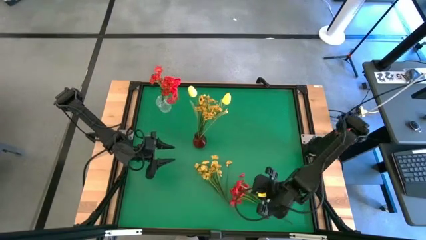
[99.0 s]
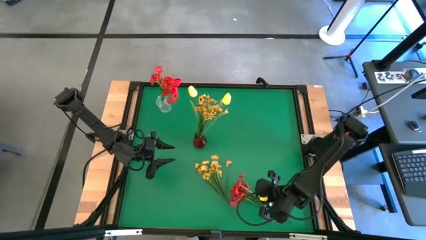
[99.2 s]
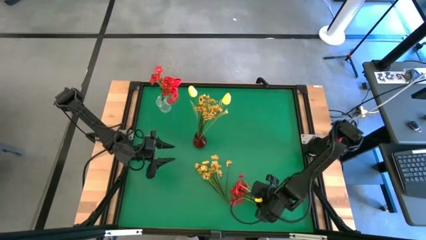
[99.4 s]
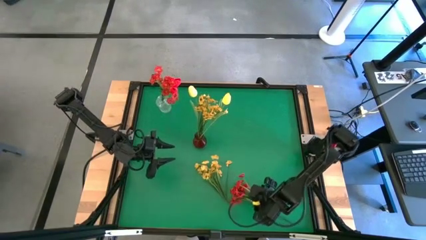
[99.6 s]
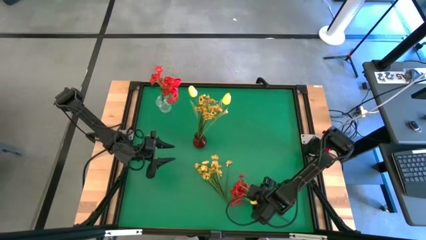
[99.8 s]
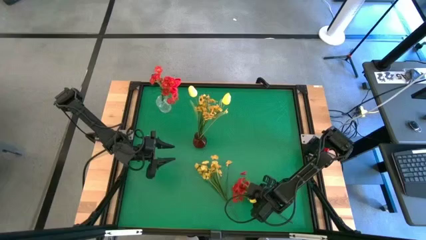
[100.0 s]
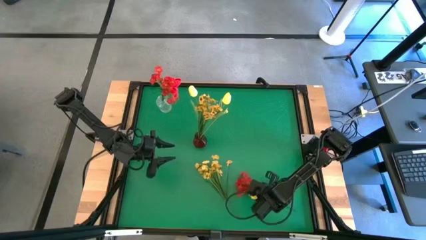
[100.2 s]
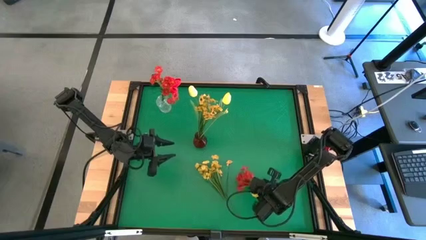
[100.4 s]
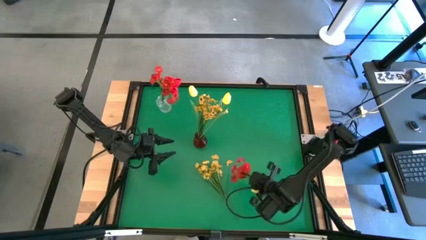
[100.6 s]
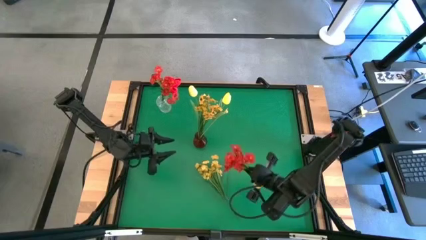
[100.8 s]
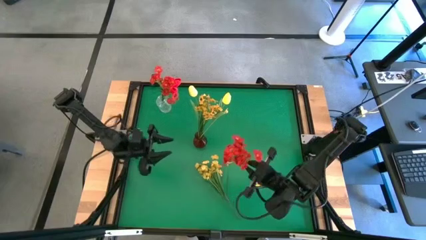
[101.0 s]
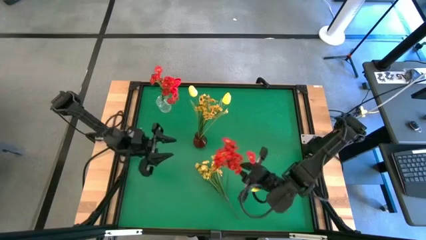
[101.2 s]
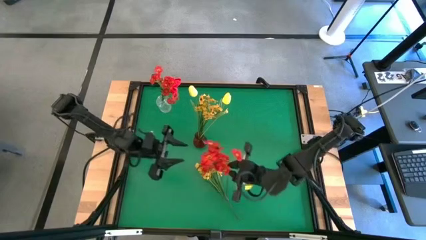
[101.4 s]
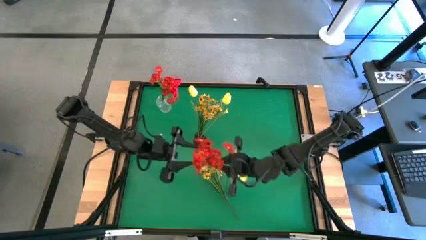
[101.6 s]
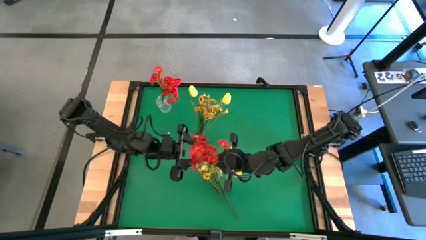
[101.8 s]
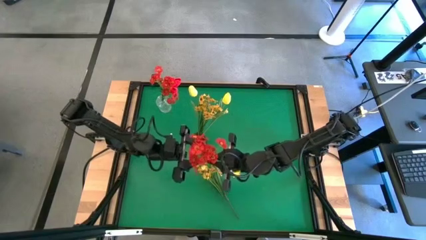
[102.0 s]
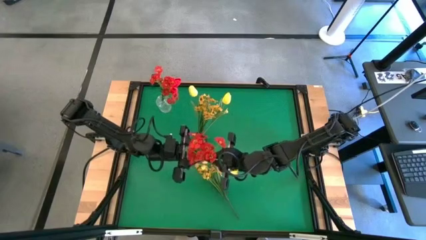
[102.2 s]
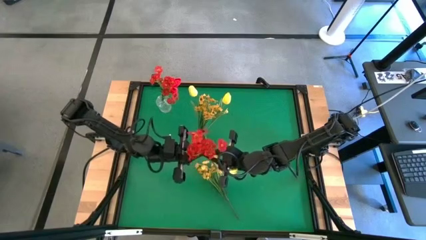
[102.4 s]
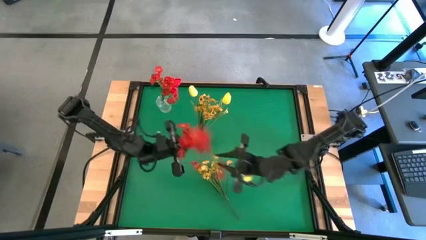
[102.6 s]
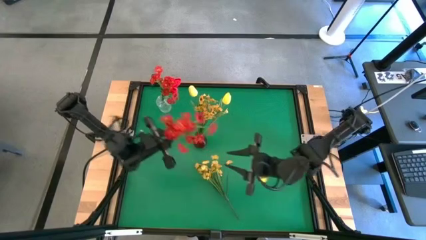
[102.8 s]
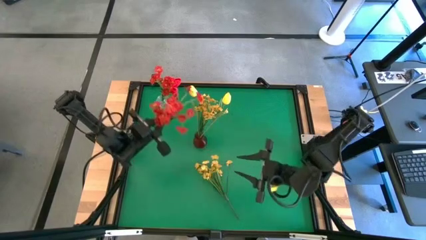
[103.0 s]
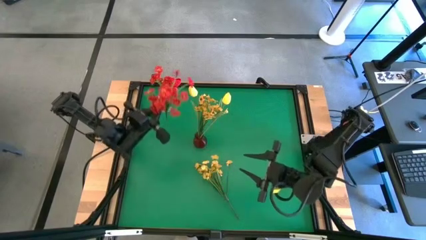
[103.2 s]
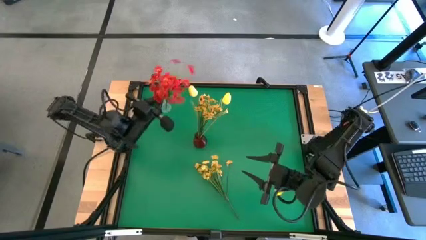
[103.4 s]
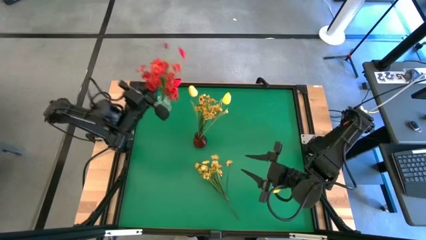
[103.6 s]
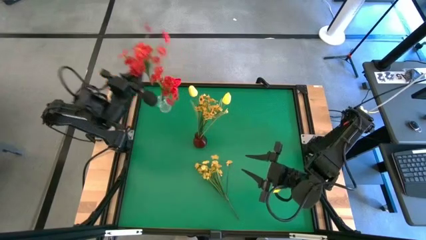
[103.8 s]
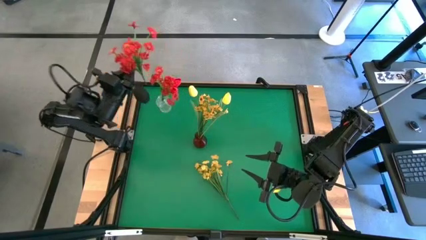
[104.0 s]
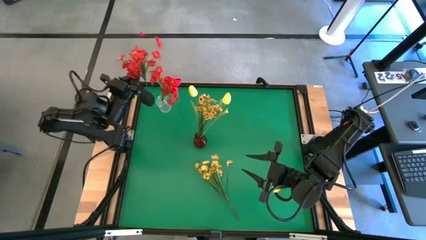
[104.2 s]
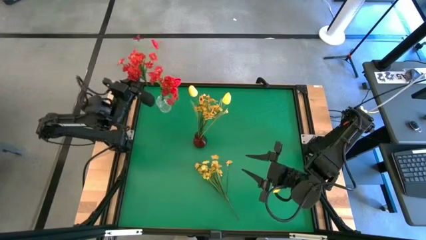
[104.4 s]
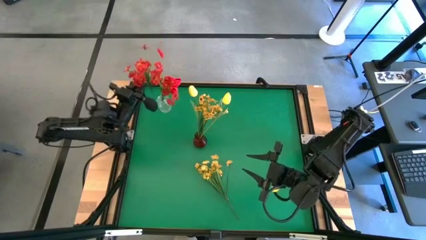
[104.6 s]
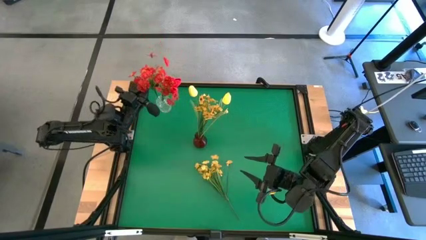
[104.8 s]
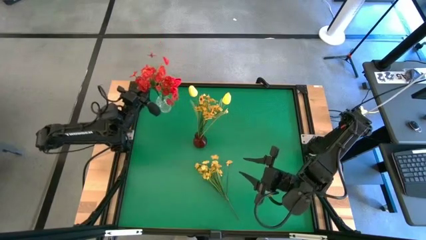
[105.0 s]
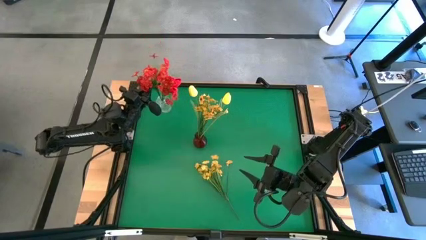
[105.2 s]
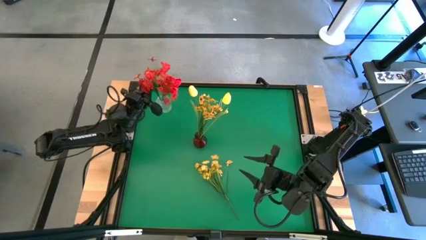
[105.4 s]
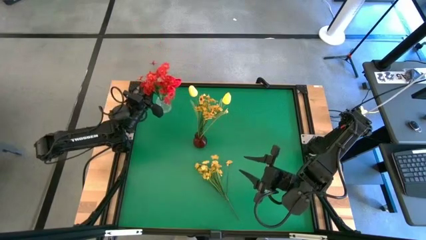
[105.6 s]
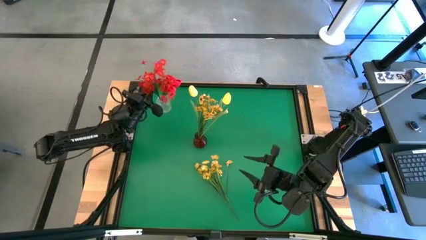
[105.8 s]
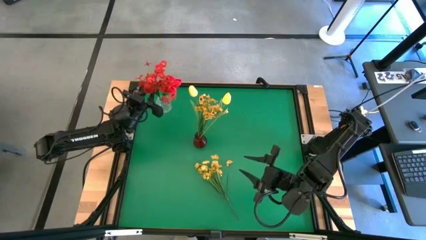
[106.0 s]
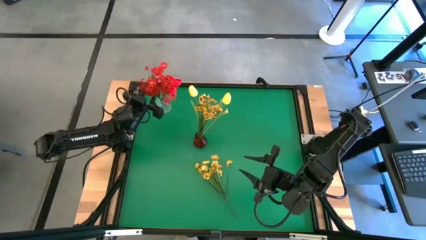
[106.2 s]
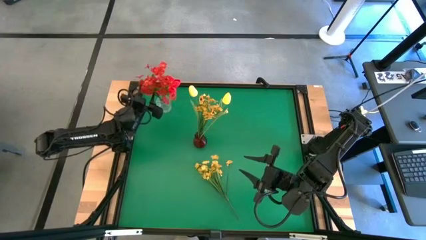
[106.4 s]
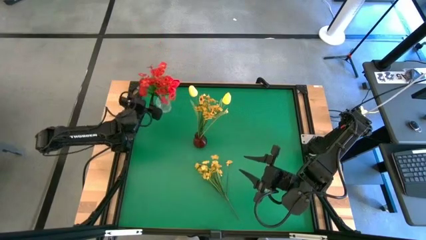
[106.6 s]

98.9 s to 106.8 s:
Task: Sort flowers into vase by color
Put the red flowers into the transparent vase

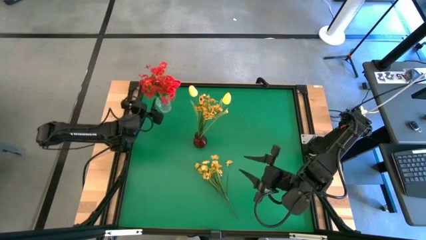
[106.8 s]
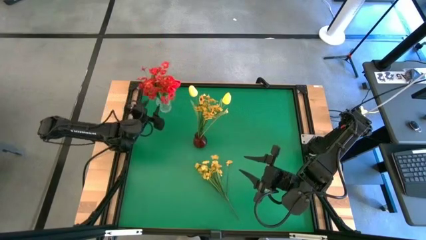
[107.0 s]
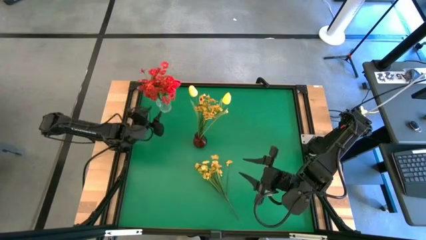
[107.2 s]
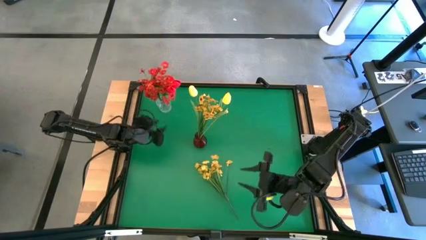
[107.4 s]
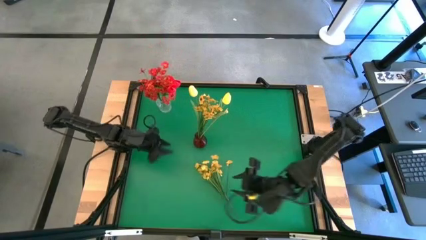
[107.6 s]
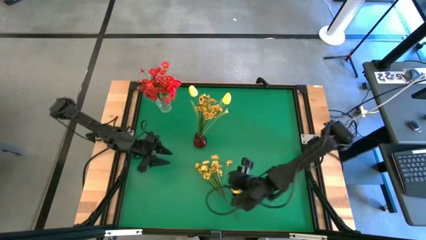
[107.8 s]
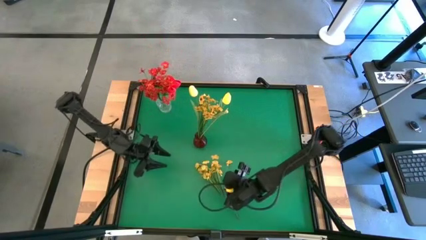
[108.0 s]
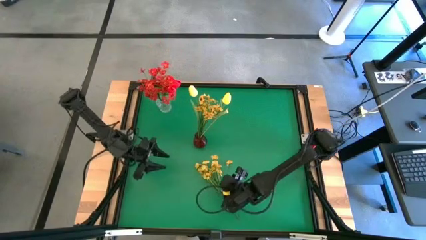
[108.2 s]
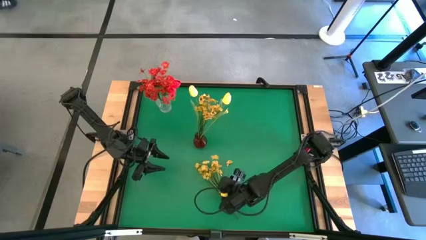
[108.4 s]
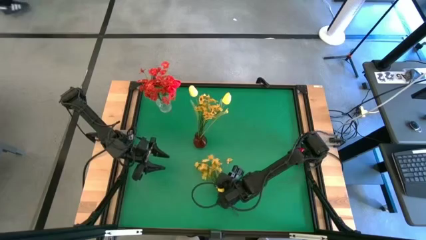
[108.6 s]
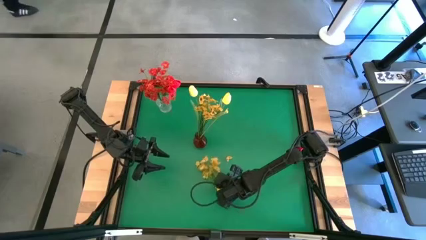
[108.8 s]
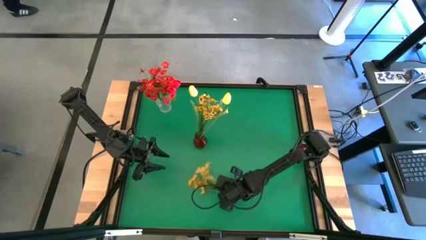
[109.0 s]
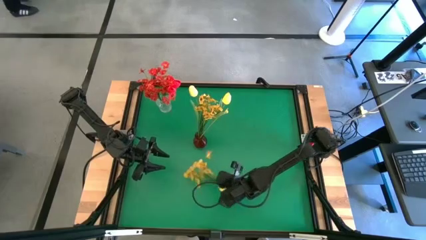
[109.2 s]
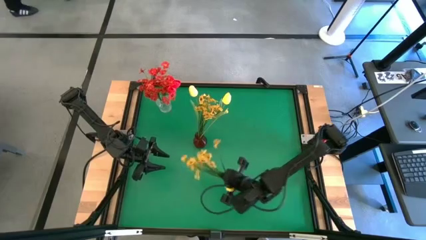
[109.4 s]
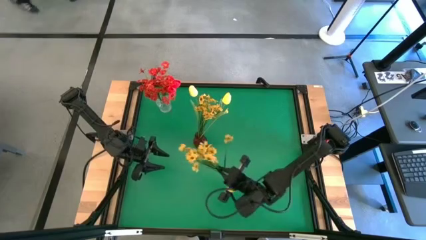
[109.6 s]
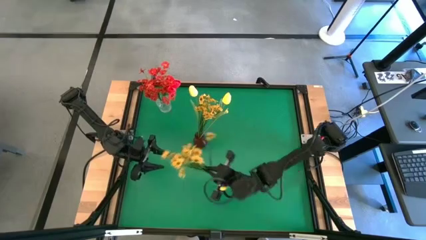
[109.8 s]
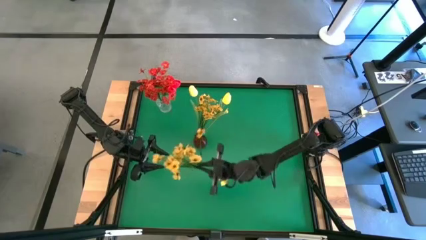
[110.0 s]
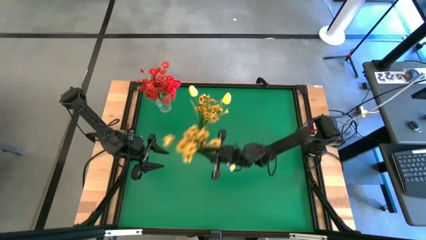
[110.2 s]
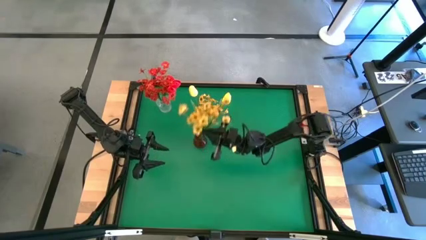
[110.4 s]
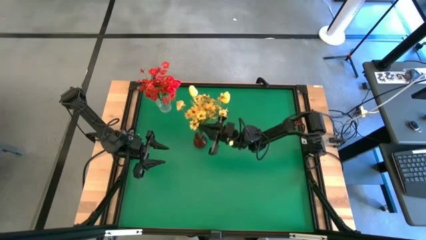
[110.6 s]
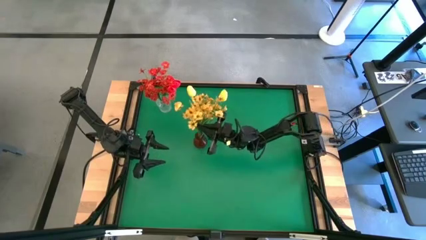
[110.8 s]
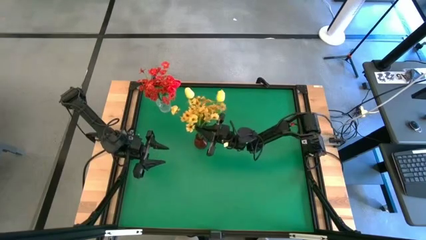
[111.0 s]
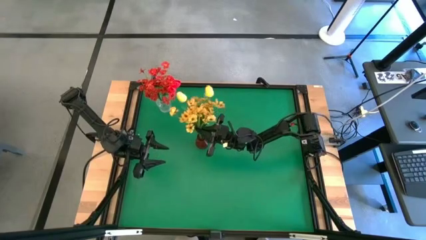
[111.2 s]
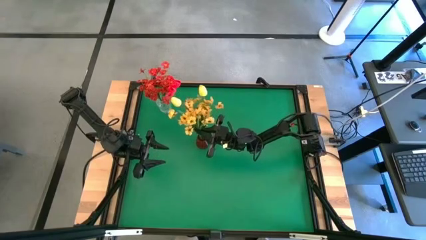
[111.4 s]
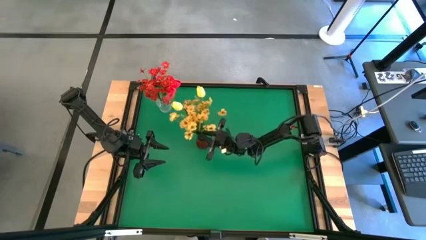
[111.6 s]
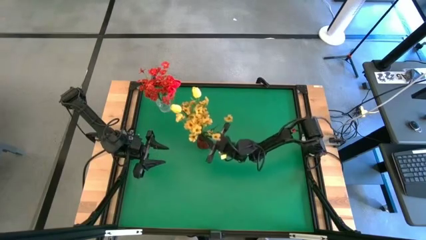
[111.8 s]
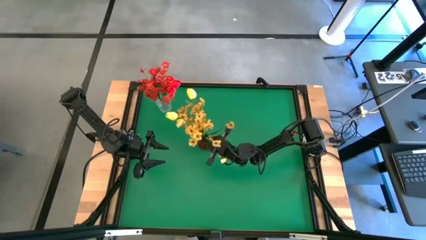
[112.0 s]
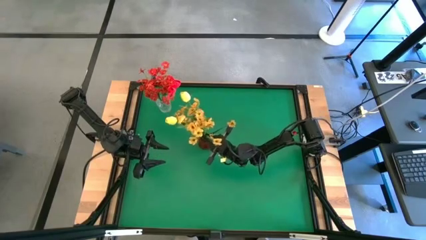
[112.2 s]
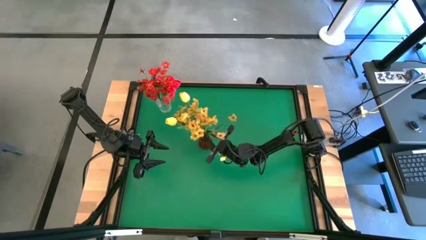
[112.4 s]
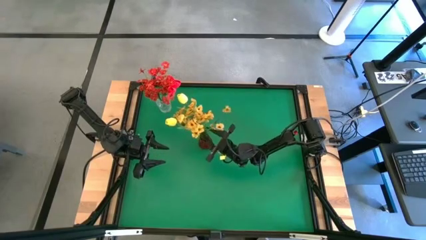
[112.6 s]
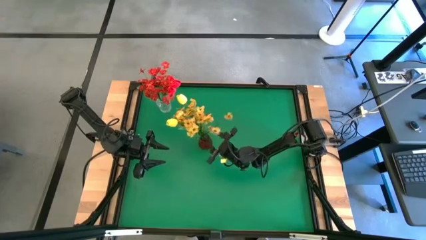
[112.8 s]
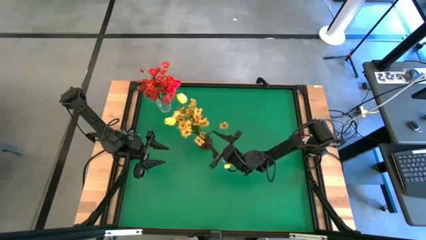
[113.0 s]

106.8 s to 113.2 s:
Put the yellow flowers into the red vase
